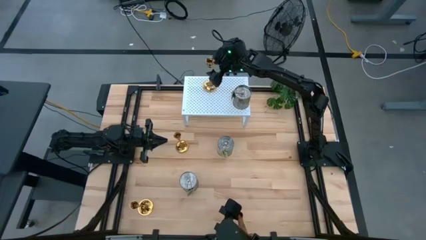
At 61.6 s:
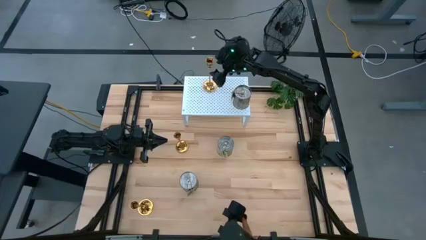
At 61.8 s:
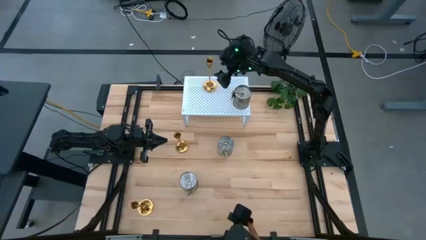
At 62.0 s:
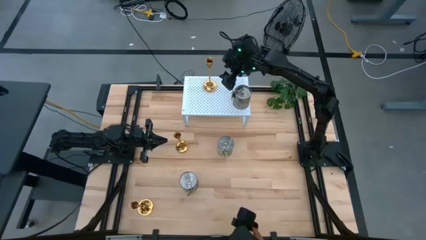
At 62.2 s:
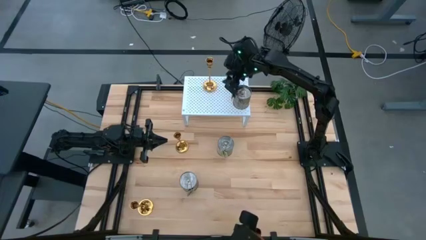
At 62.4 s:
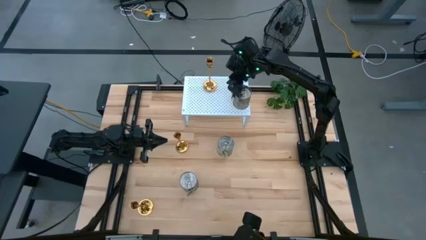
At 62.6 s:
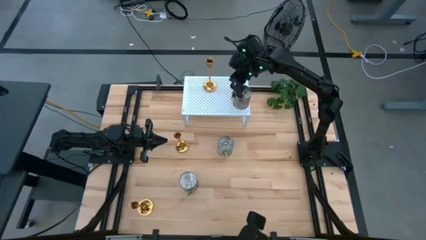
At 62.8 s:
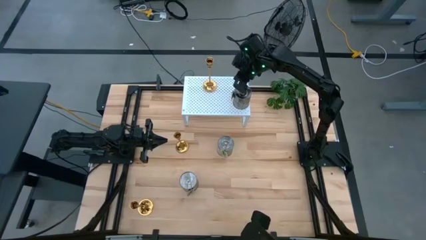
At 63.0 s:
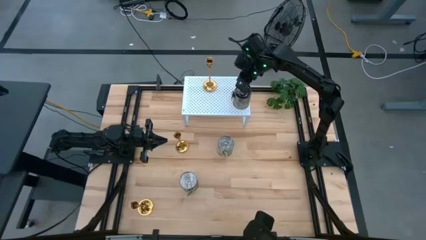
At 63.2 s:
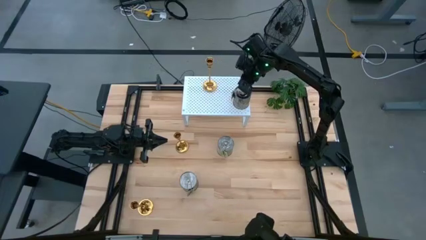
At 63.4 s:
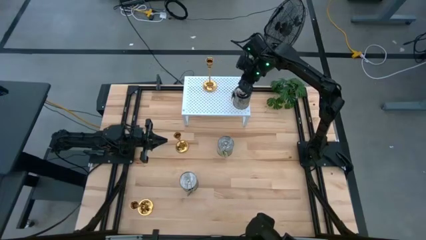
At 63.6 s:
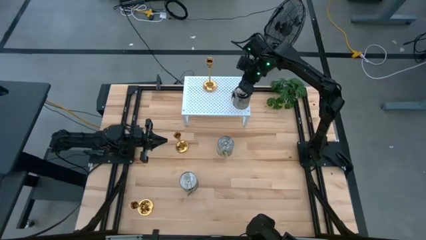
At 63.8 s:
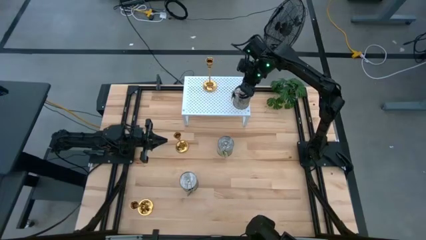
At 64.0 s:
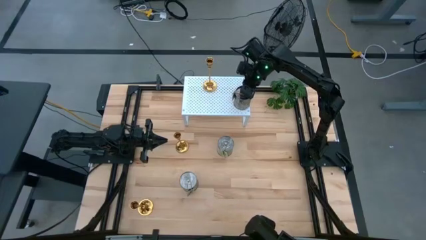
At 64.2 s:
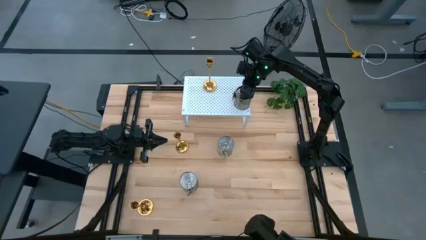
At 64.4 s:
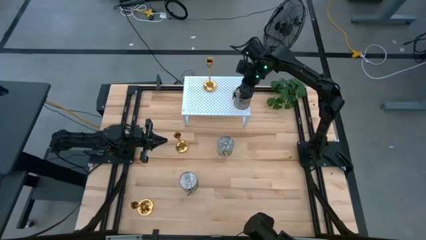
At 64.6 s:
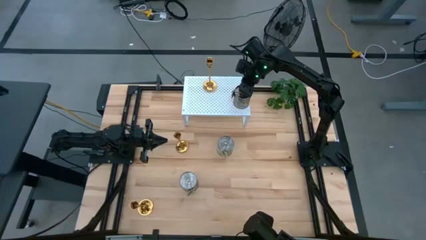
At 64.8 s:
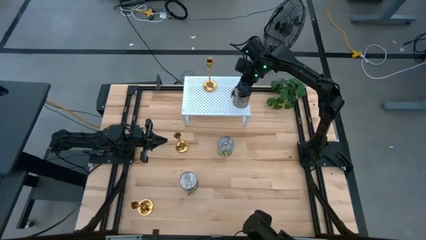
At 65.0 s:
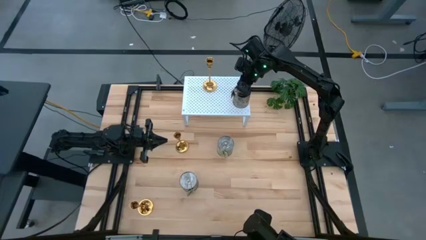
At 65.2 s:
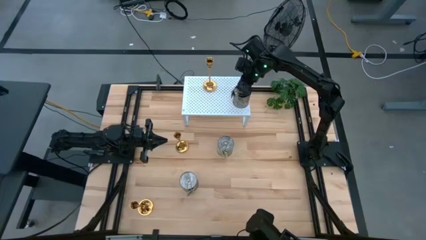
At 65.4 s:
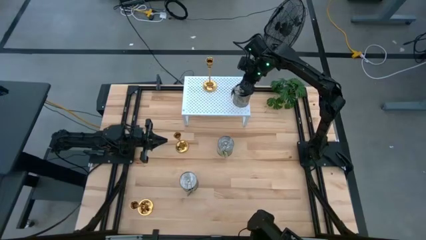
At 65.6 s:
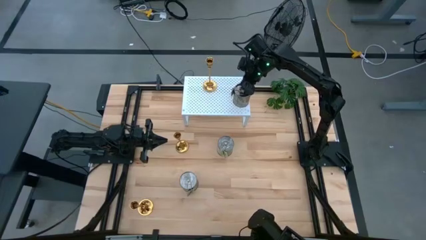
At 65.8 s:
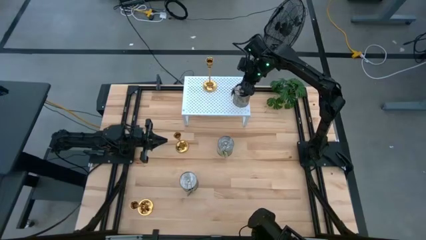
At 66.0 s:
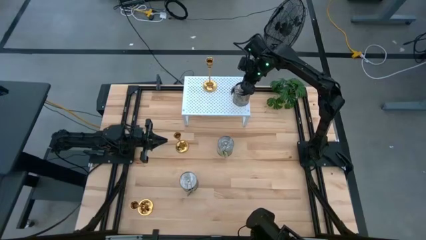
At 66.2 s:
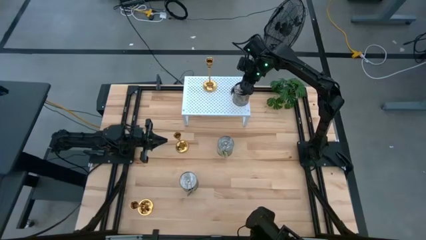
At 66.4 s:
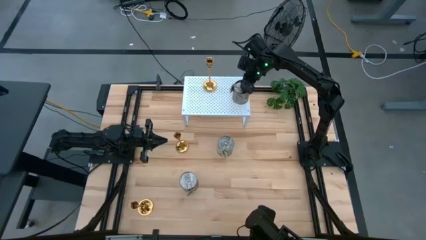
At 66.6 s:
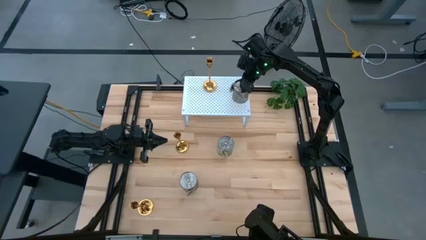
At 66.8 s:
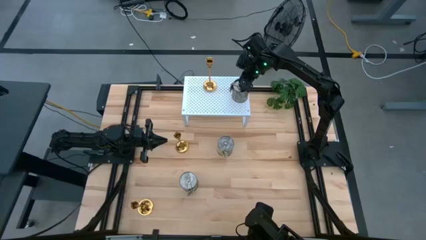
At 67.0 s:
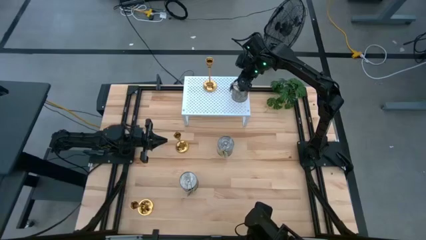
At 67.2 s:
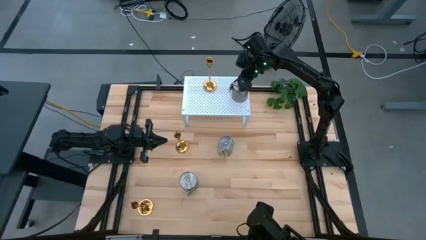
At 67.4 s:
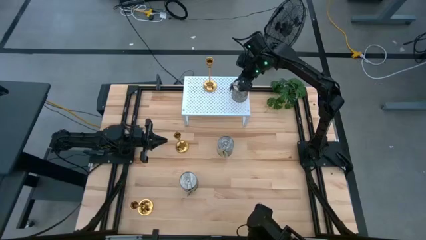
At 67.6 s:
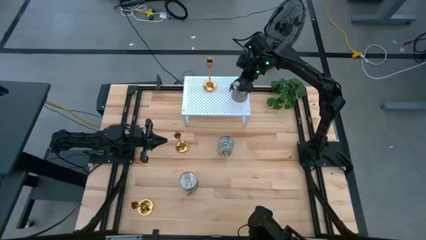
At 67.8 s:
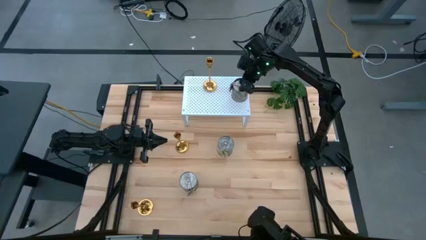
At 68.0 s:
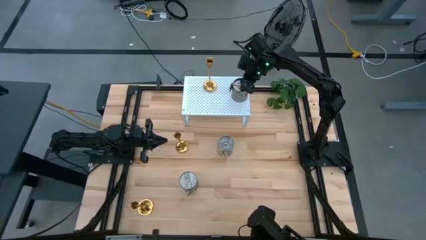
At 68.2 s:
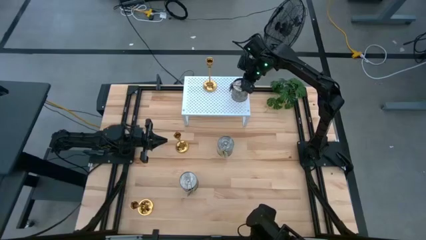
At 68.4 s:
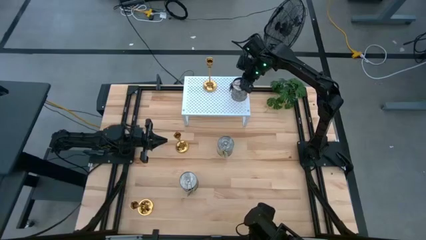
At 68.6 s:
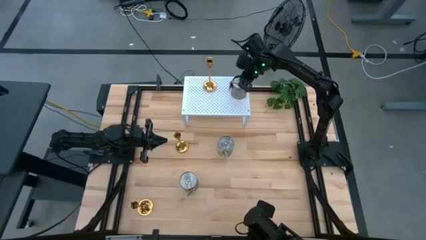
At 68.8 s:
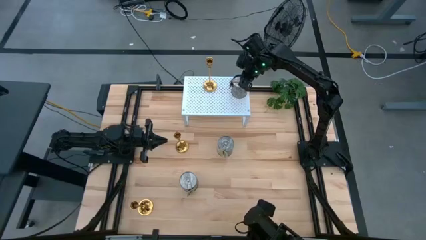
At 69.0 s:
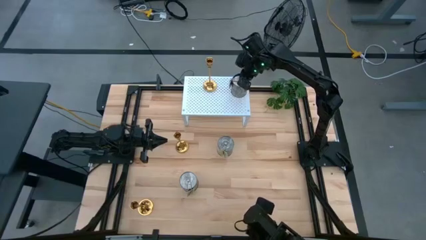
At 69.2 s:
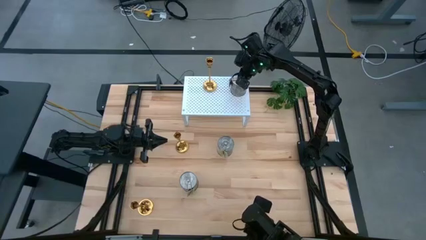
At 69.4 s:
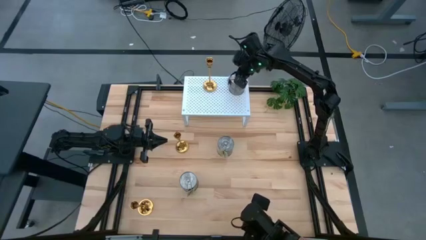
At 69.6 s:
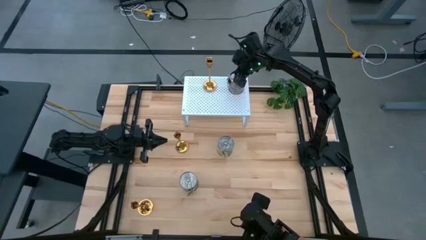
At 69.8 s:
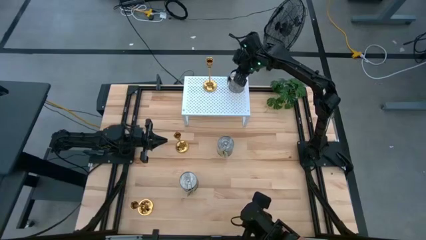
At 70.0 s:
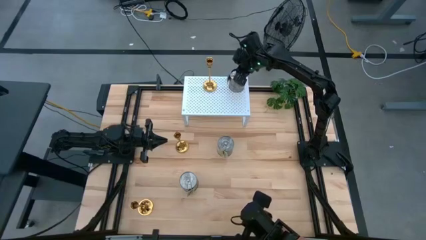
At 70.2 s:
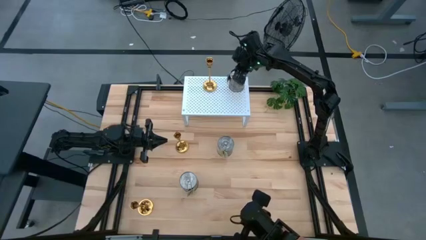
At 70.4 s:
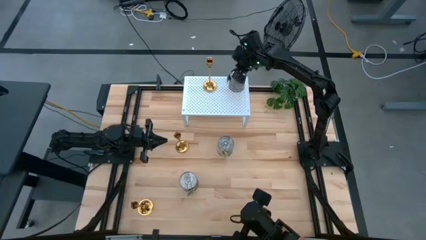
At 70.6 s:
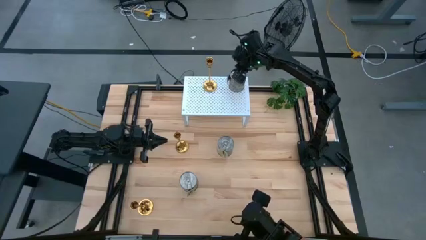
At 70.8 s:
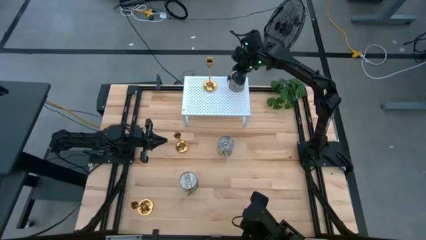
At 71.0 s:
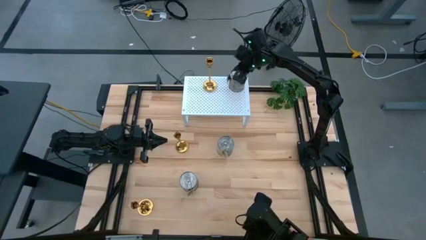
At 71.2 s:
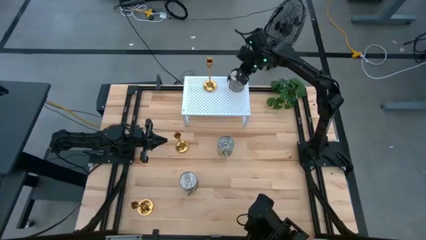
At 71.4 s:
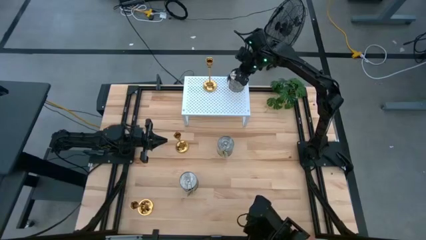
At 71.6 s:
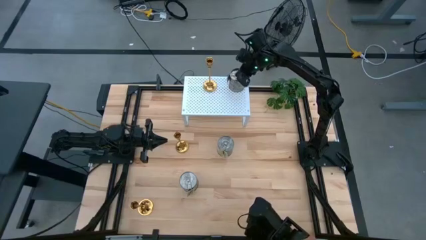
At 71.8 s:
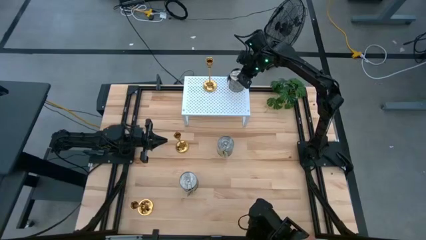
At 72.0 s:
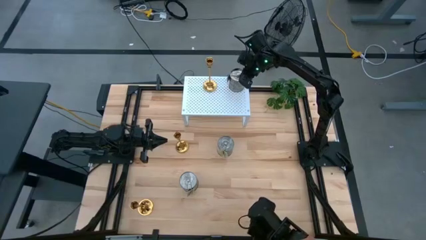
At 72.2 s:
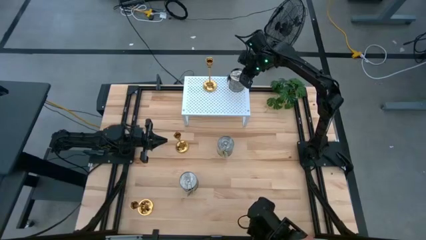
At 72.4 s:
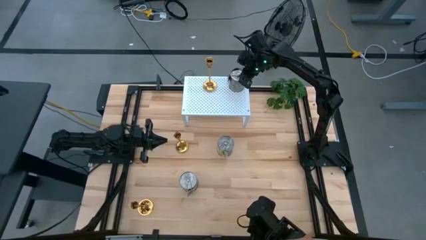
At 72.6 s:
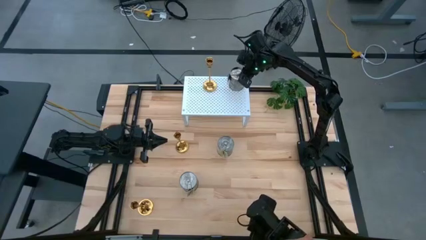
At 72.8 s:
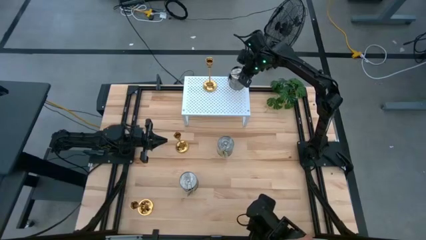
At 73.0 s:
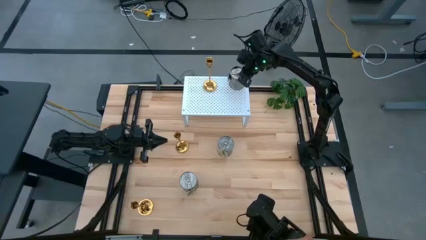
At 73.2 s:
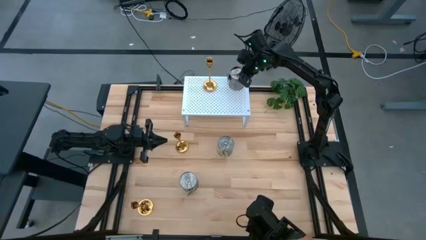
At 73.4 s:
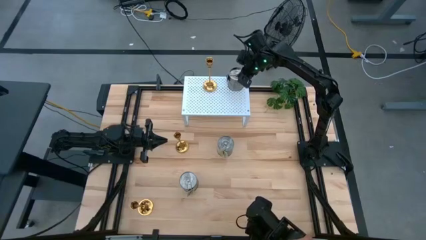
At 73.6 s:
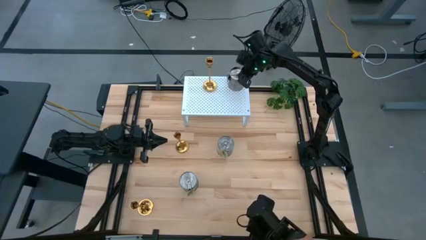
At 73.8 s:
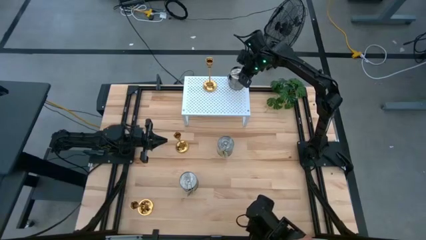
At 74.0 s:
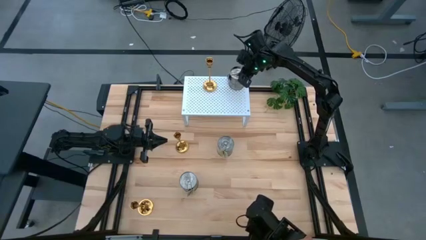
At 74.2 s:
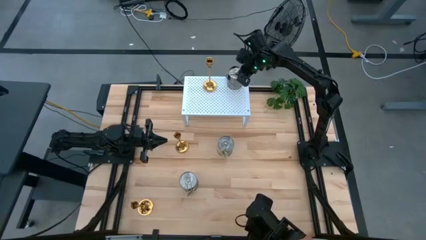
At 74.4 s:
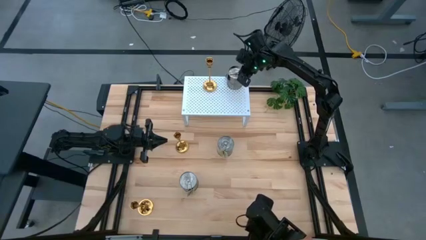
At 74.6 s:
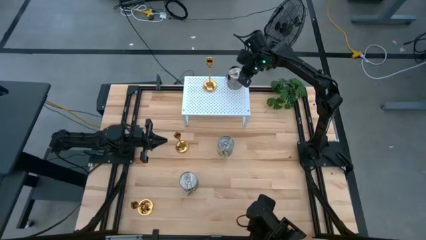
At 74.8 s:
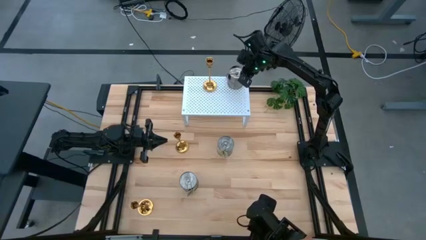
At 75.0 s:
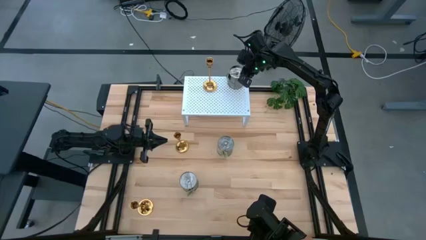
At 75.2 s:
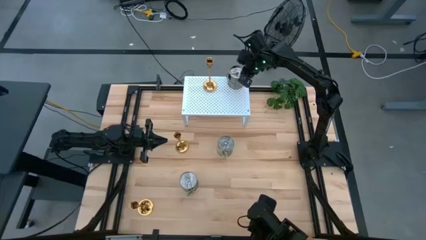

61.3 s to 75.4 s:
Task: Pick & Place candle stick holders
Adjust the scented candle can on the shelf
